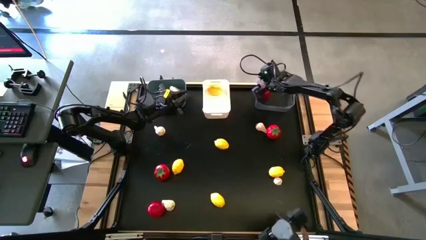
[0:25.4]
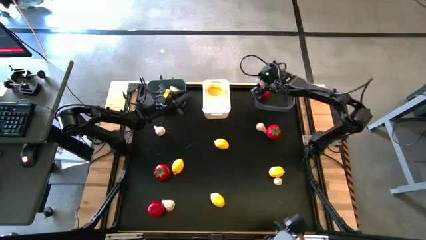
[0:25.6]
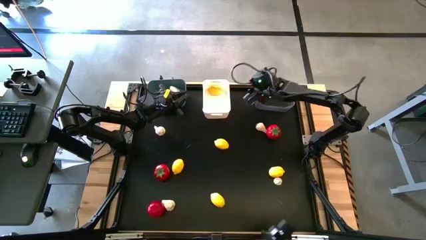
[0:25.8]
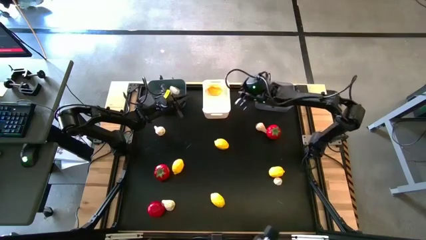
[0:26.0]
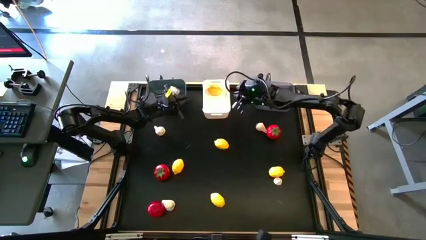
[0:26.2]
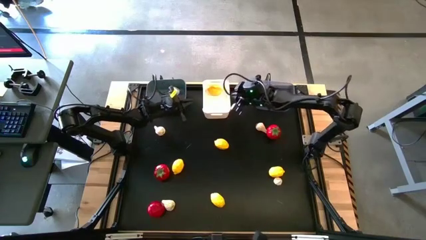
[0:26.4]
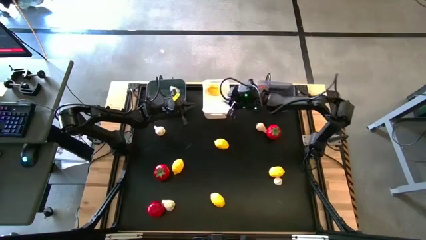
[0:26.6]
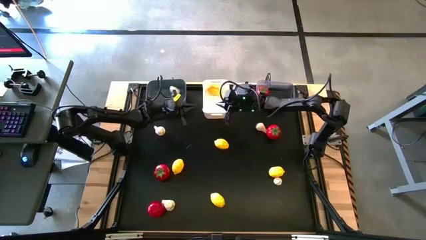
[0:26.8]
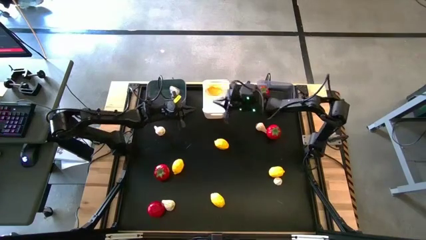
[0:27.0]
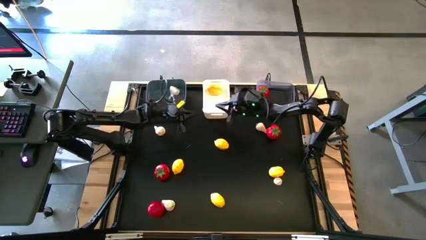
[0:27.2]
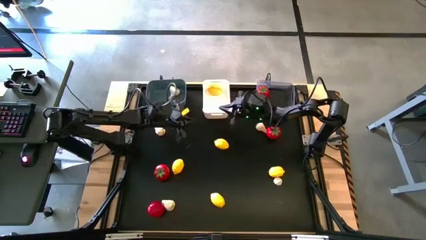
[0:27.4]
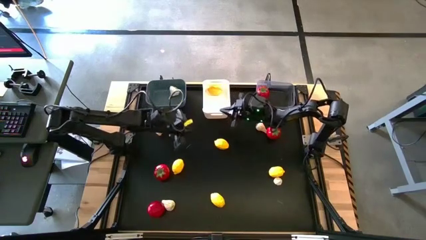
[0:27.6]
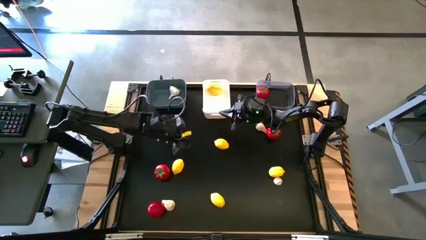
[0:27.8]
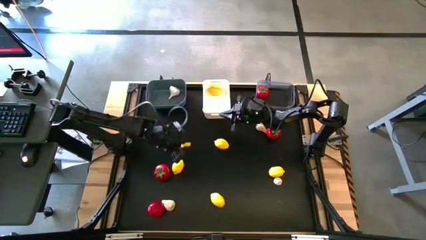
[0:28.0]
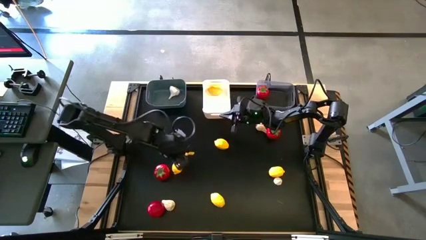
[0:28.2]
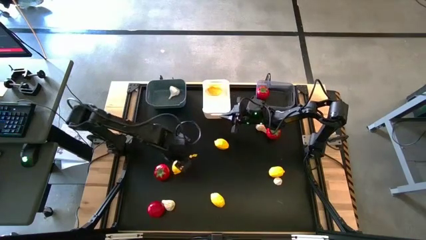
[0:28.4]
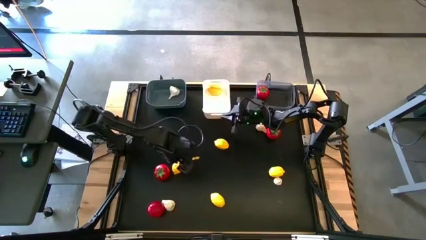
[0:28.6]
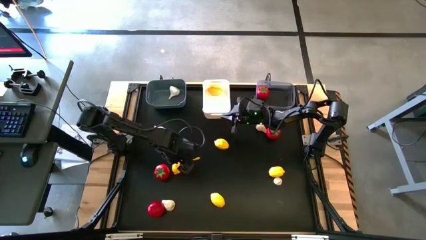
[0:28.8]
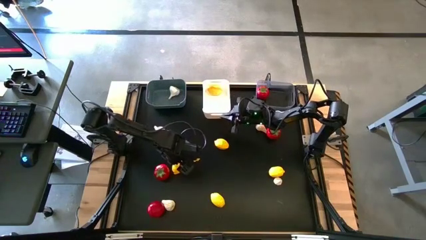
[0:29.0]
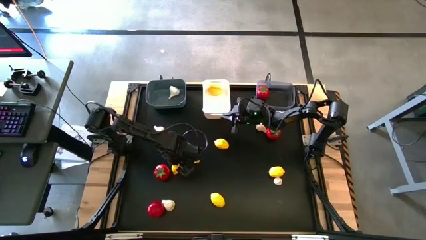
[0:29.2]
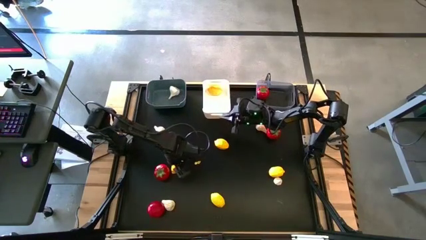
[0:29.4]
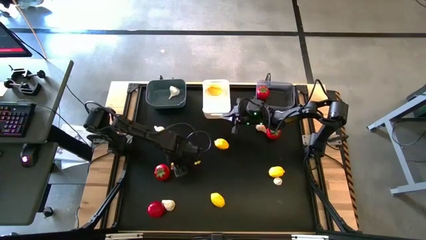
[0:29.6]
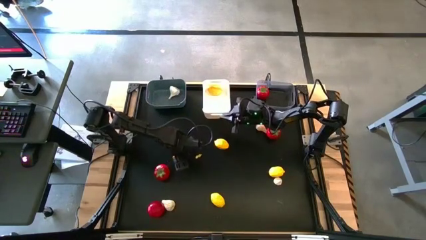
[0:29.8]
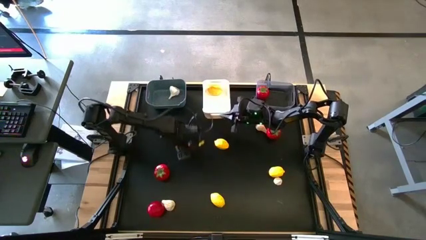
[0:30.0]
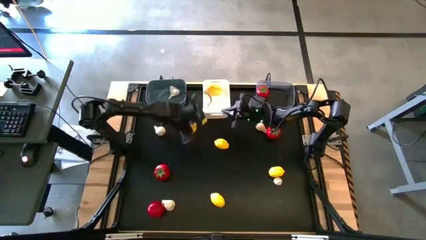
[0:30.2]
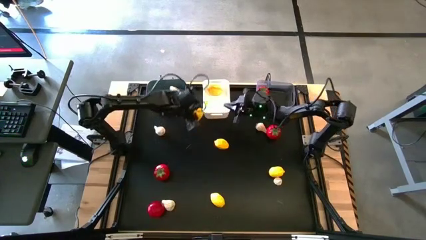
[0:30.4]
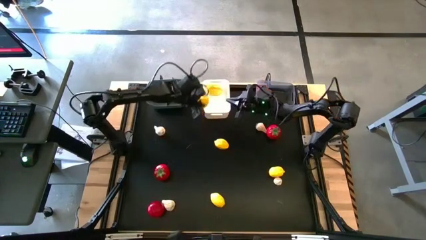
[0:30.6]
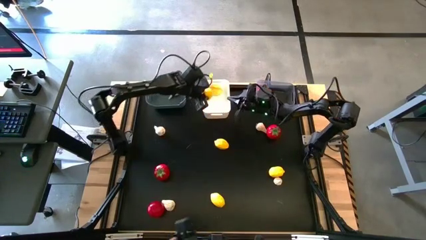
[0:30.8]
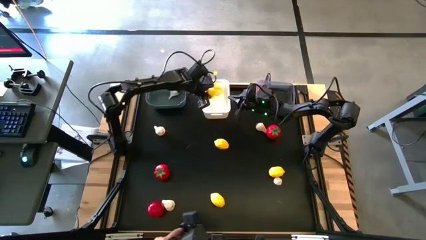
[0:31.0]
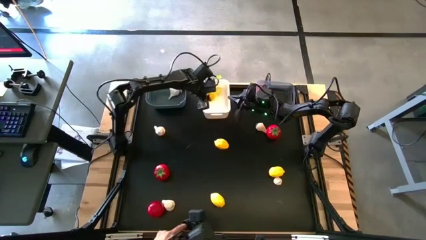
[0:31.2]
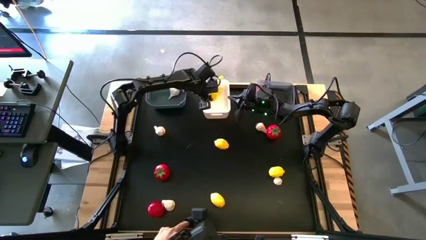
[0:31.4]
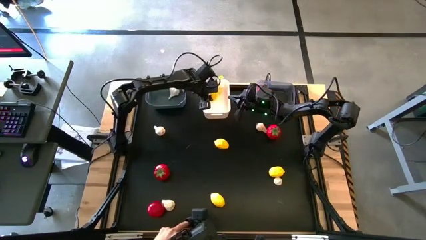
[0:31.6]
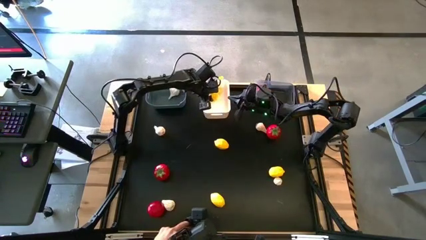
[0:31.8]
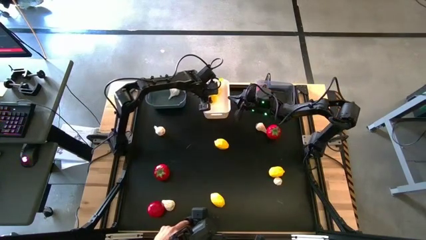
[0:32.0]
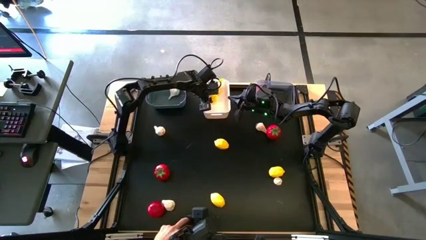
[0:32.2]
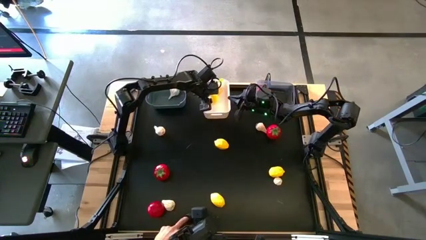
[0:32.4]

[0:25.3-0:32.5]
Task: Sort produce into baskets
Put the yellow lemon into the white bin

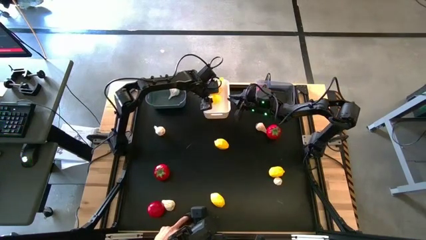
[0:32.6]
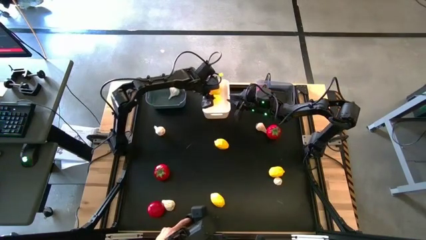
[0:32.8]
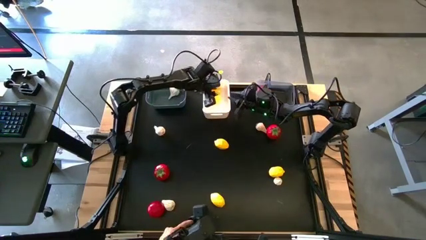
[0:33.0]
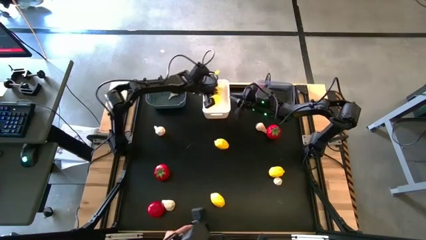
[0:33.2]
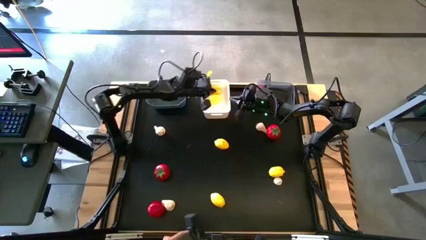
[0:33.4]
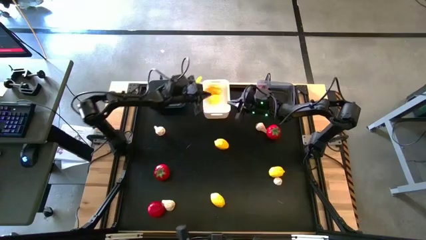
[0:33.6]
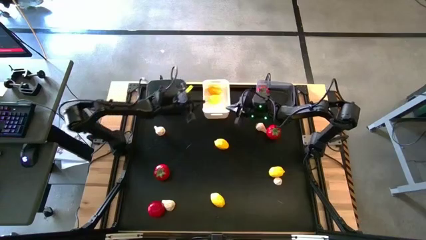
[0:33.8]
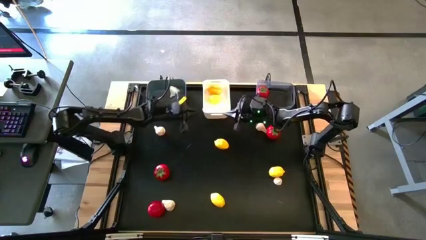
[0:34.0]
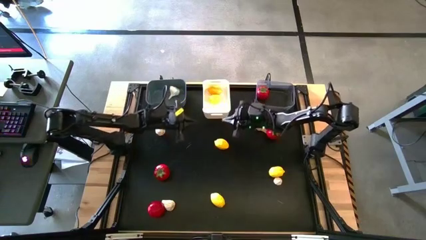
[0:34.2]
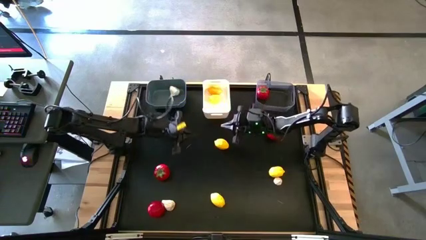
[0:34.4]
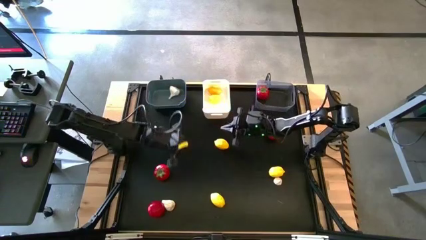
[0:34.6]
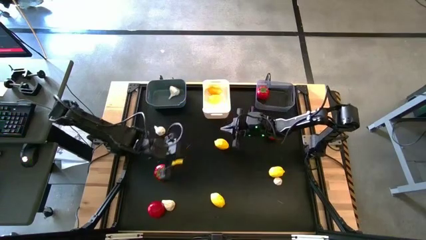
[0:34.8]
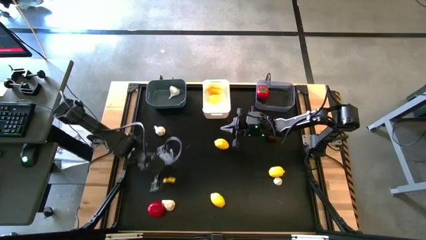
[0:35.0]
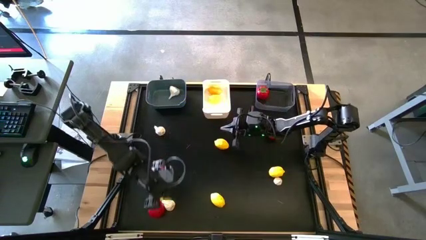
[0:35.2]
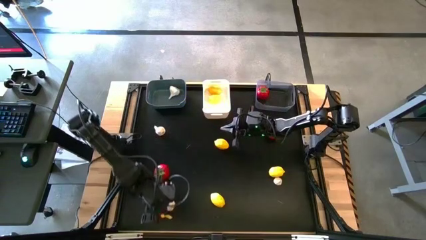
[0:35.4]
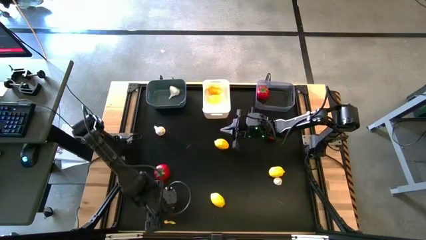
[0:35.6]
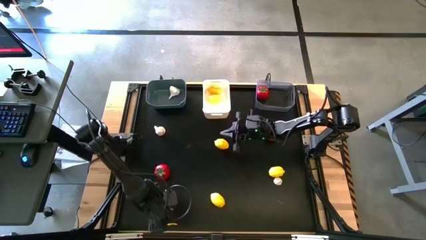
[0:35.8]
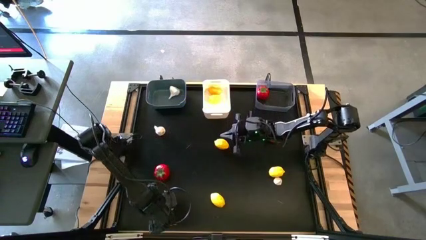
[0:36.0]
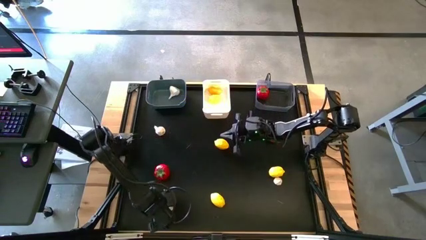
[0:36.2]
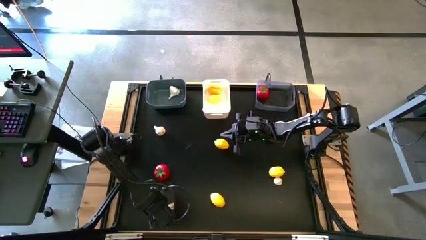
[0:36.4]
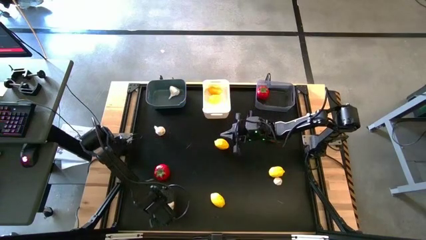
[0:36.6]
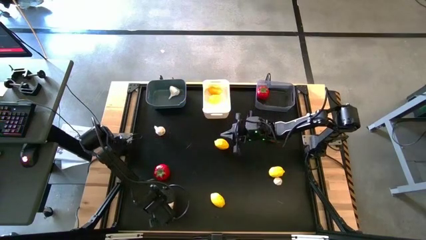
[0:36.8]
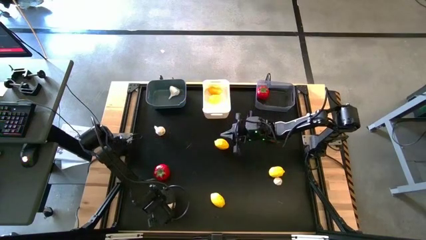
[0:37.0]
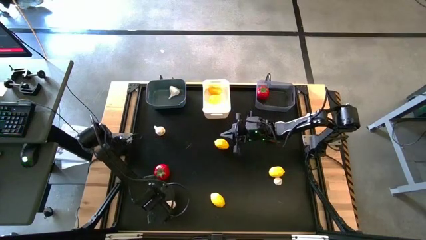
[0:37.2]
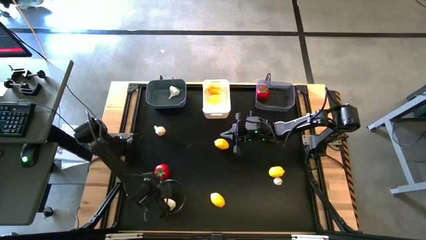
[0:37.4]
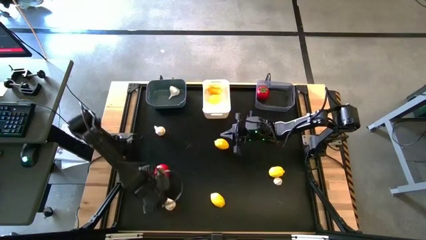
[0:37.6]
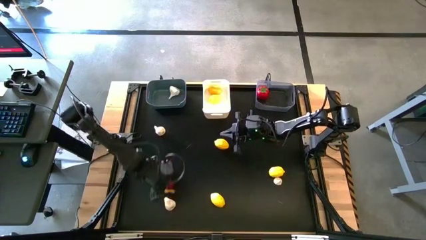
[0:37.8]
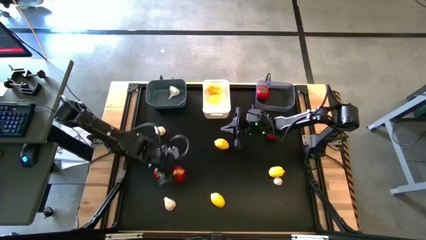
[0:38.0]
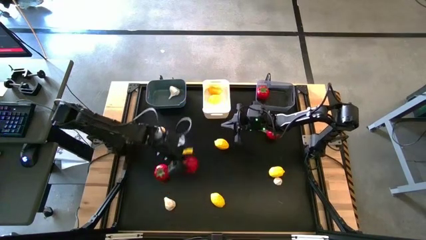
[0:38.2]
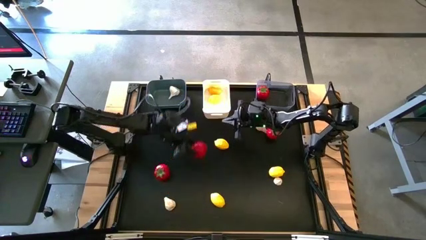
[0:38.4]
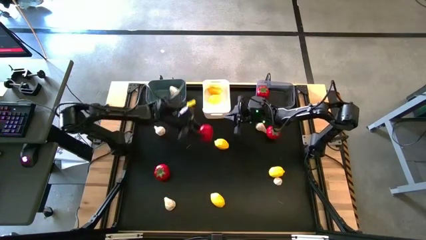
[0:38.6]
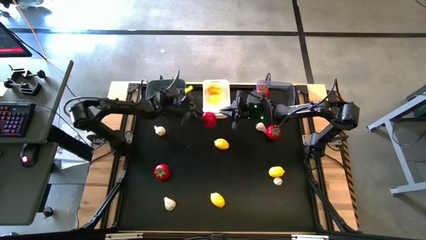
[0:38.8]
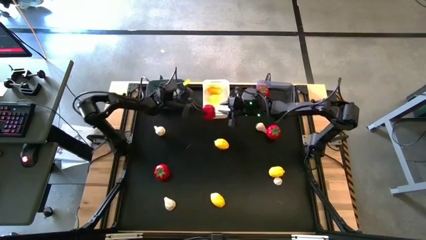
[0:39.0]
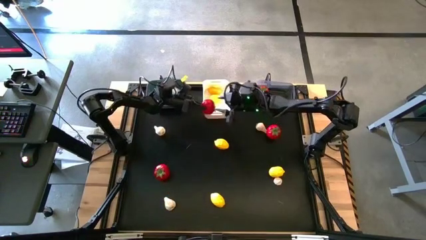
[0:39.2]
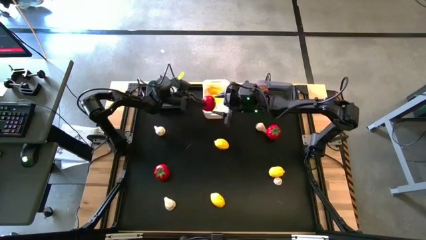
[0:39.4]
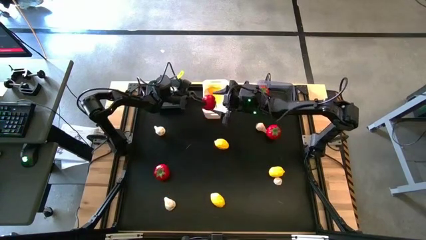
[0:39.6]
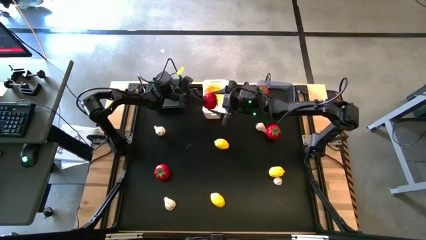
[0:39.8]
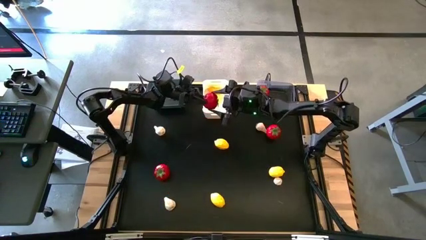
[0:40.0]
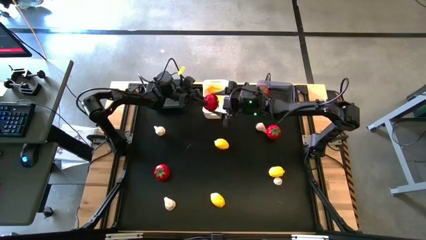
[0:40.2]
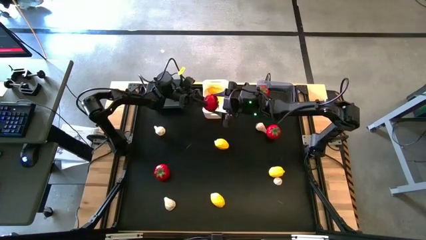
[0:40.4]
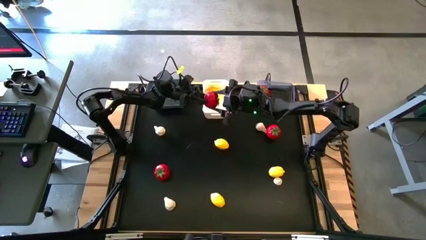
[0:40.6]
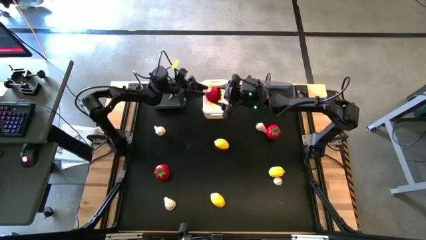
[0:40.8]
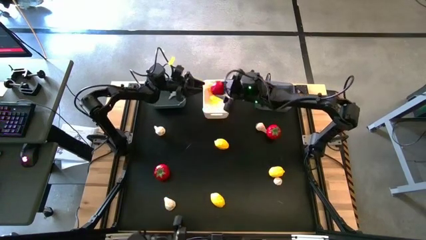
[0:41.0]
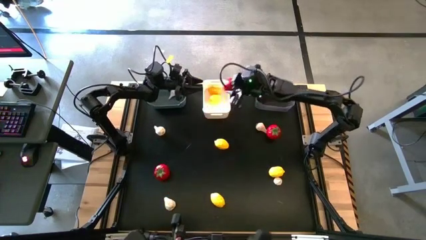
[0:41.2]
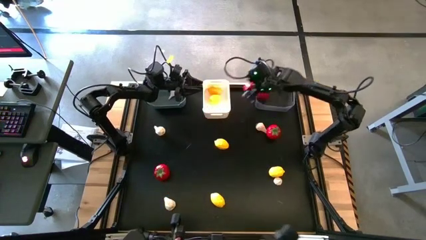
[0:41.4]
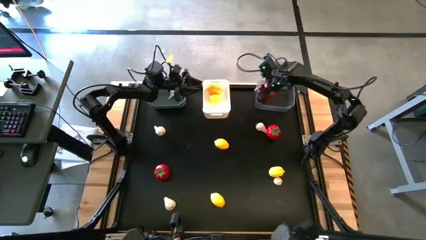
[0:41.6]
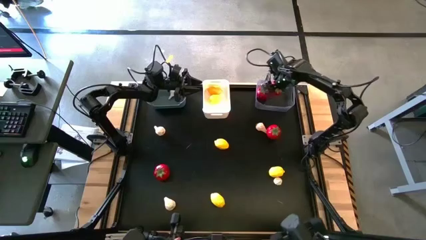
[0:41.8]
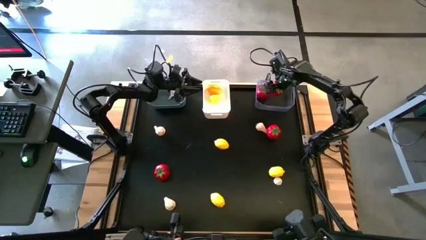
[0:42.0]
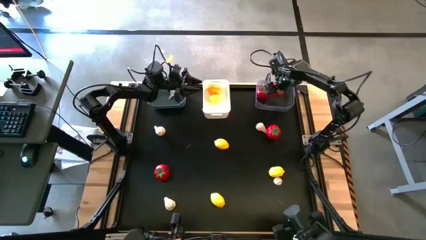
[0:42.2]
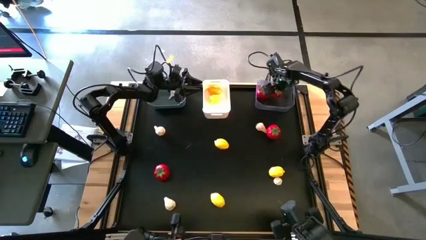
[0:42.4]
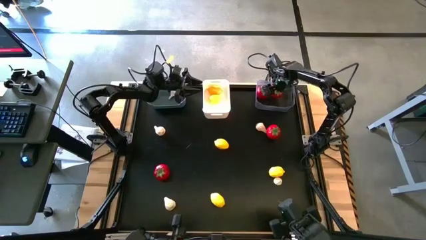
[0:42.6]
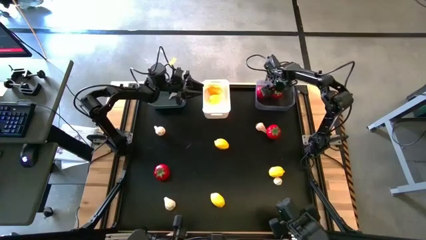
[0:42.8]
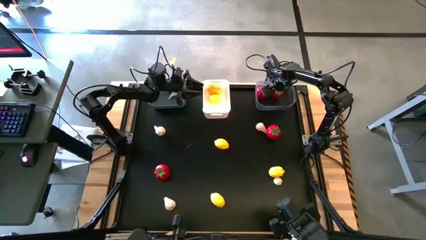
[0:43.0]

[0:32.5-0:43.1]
Put the red tomato into the transparent bin
